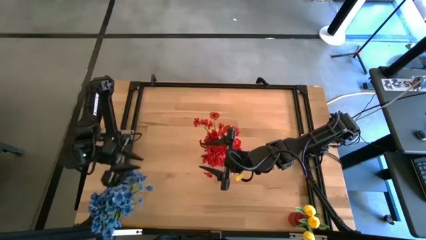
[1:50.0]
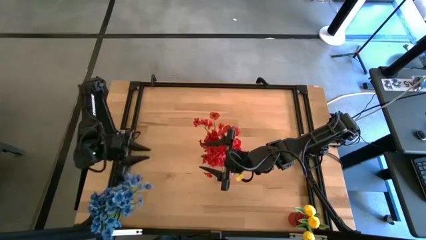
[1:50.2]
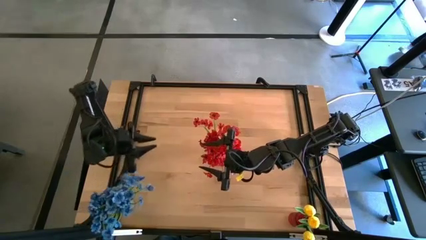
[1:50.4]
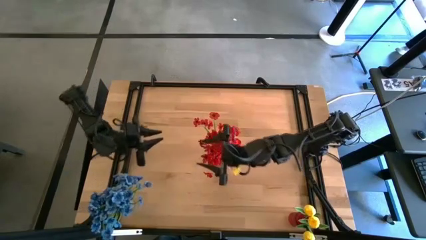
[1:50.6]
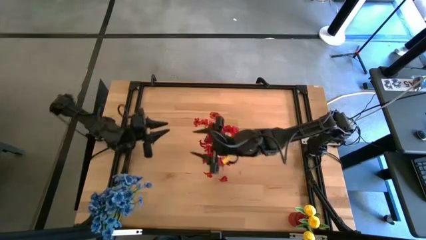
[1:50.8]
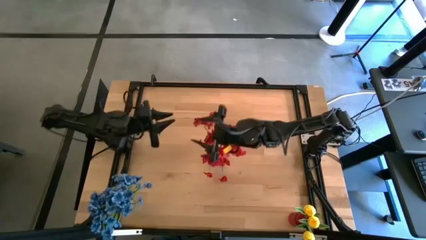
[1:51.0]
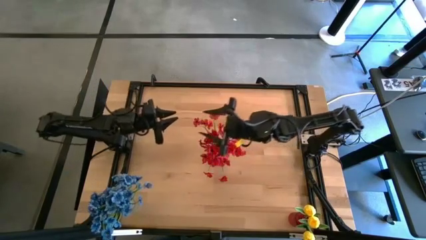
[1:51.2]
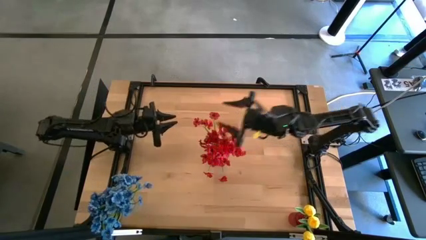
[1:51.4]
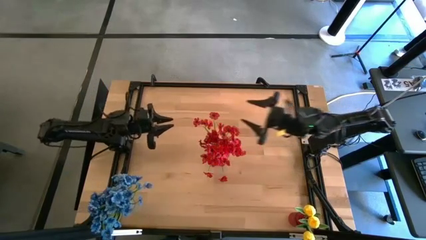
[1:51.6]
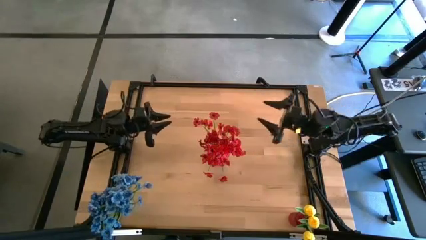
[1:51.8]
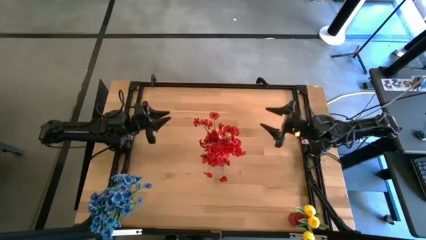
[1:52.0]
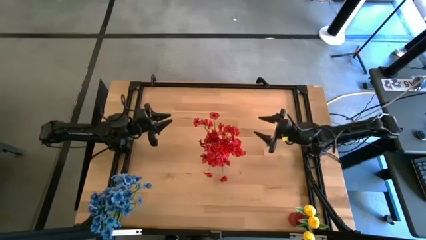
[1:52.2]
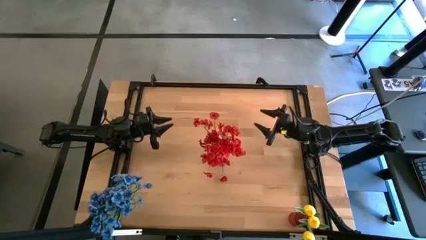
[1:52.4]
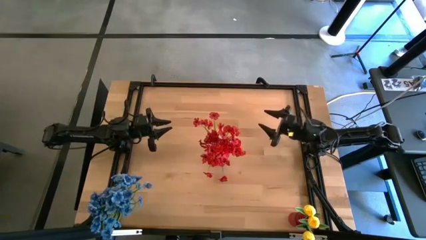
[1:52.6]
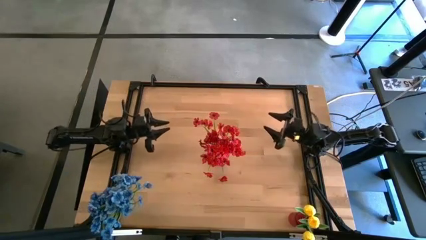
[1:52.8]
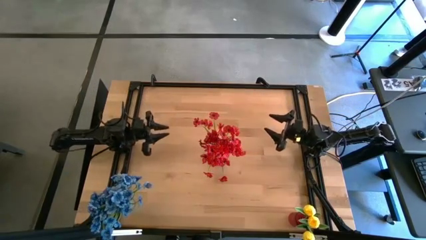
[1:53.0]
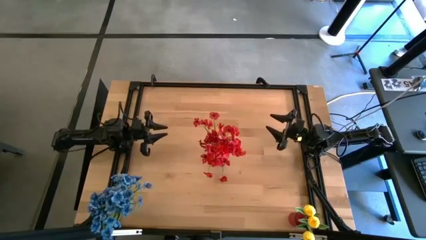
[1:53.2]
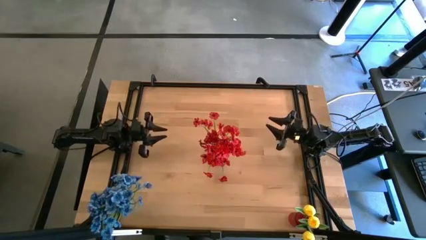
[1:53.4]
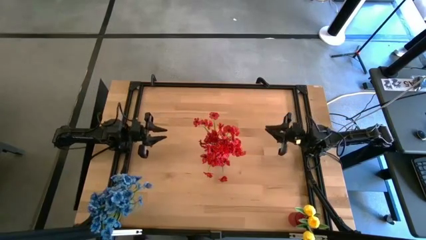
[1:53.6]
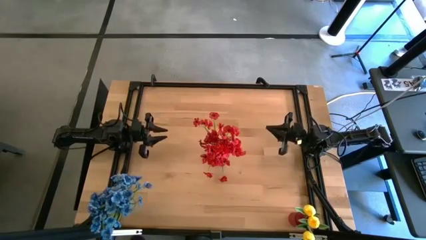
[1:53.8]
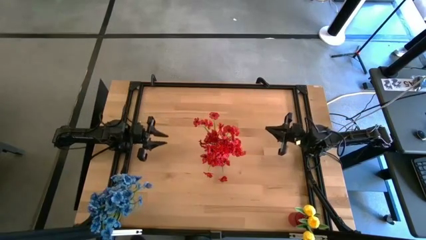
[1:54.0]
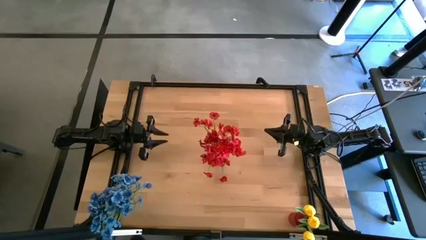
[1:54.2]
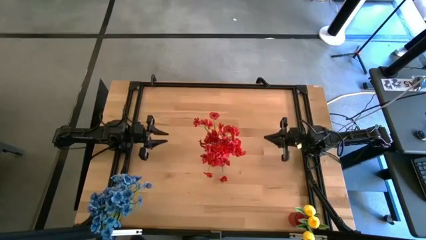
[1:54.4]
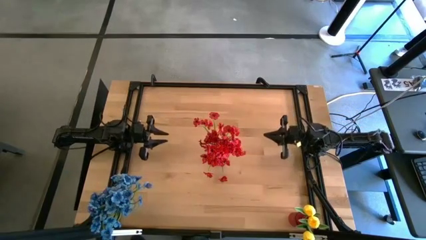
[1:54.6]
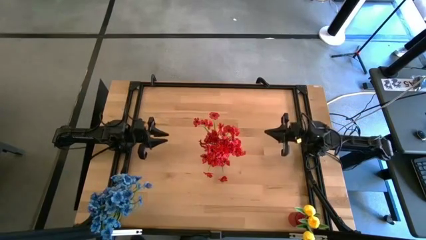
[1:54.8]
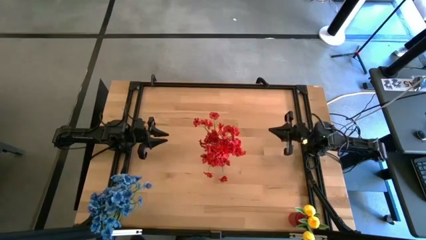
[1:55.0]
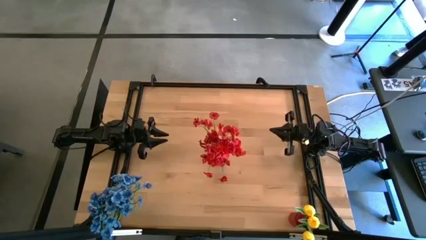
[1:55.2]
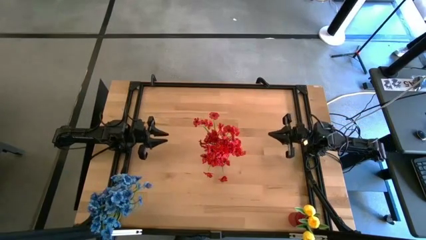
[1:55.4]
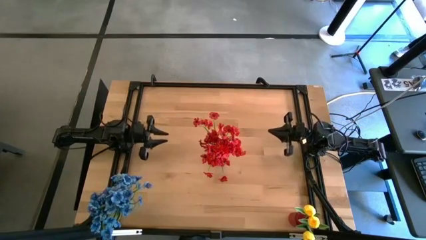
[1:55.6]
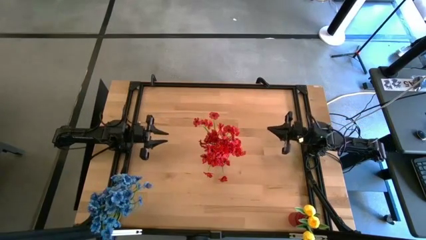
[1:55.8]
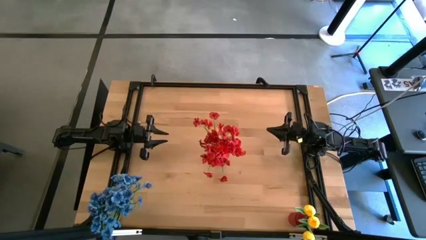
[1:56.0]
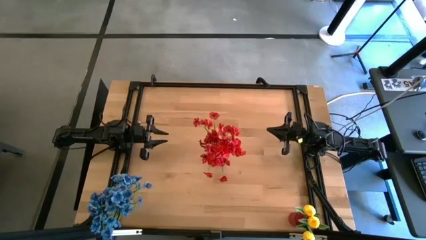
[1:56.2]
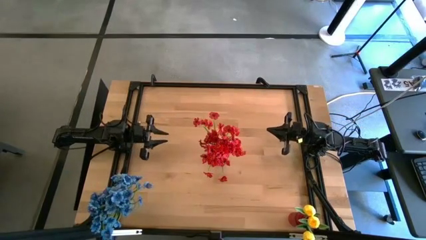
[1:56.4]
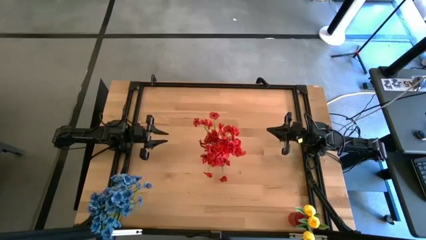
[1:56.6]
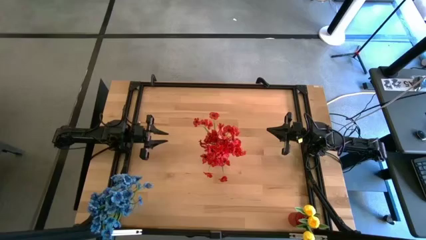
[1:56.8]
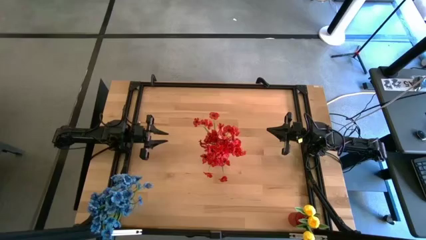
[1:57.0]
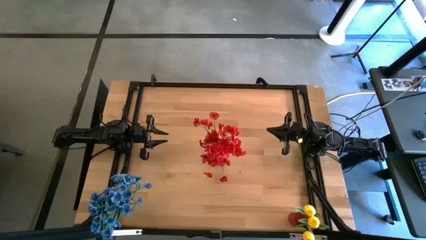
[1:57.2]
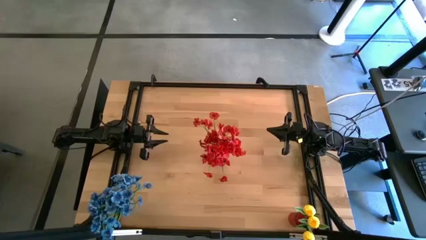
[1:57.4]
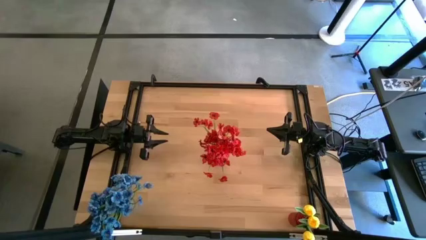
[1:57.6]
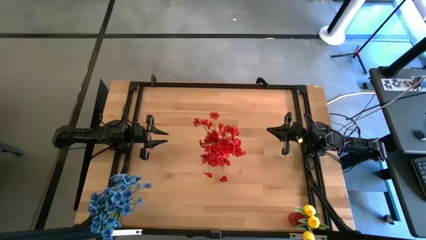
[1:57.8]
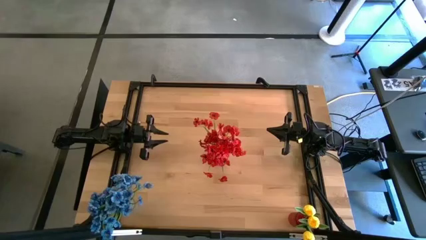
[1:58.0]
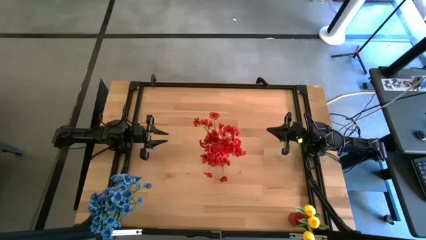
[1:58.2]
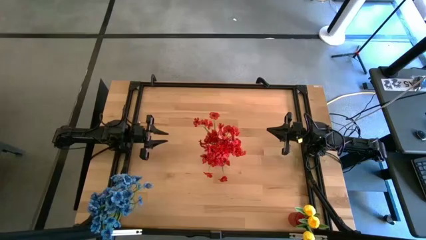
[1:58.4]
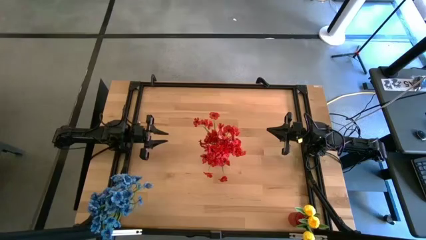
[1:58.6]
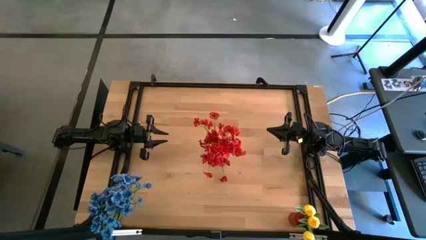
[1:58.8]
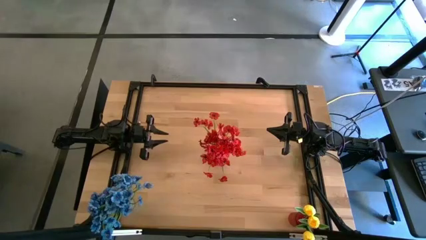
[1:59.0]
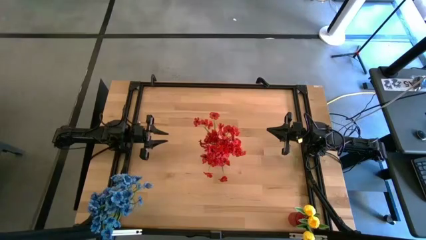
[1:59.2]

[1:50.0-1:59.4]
Task: Sort flowers into vase by color
Return to Home Position

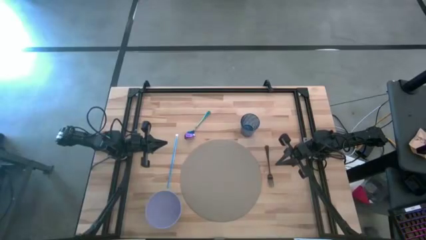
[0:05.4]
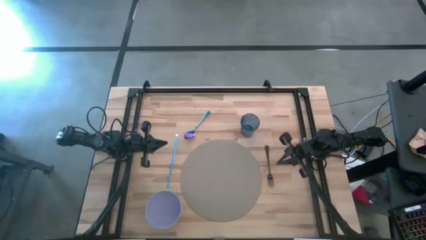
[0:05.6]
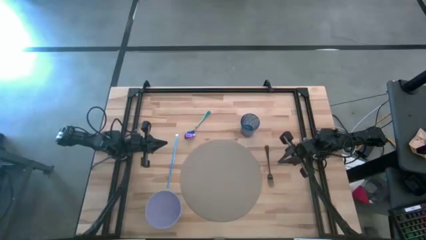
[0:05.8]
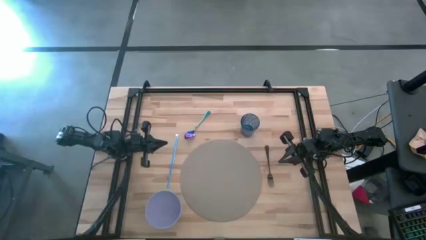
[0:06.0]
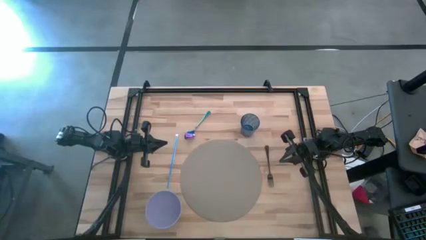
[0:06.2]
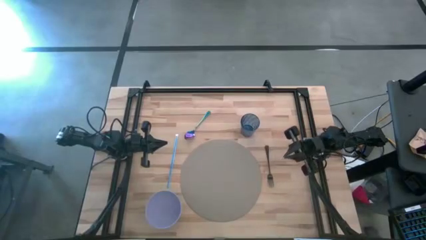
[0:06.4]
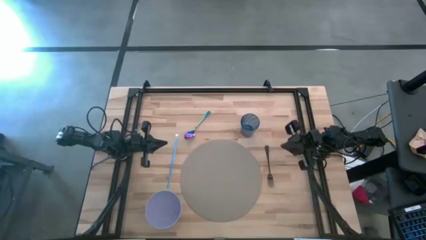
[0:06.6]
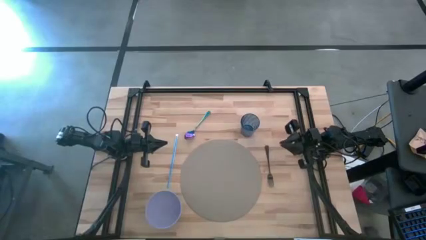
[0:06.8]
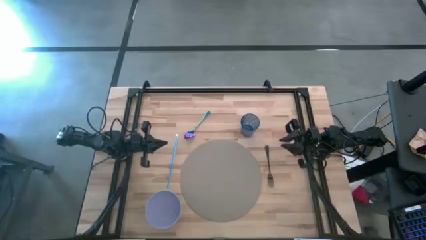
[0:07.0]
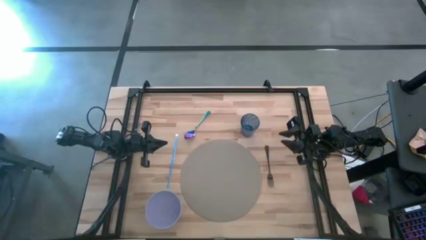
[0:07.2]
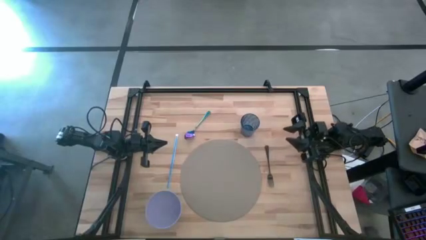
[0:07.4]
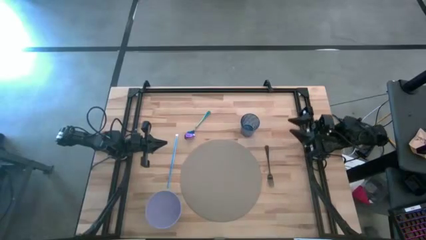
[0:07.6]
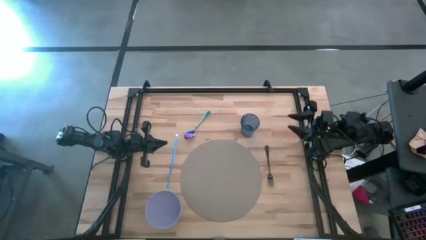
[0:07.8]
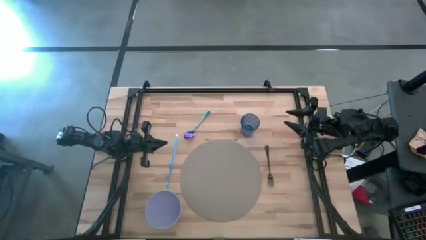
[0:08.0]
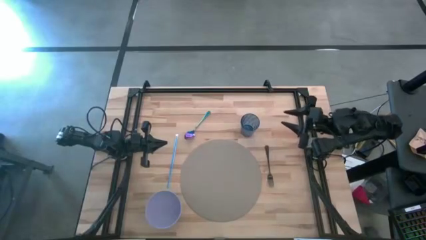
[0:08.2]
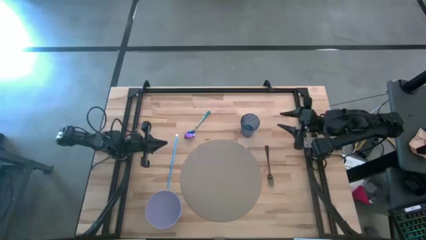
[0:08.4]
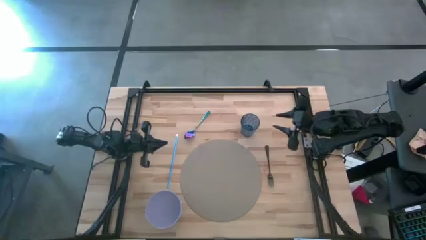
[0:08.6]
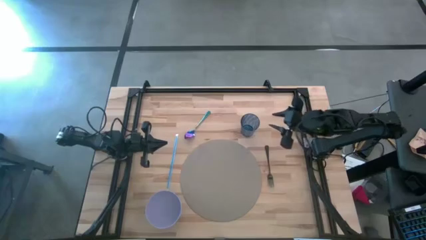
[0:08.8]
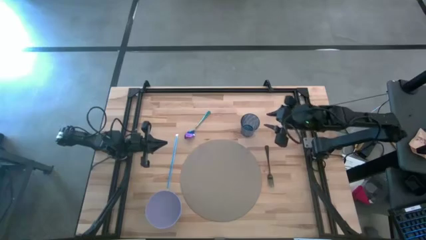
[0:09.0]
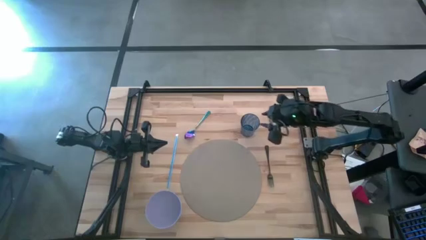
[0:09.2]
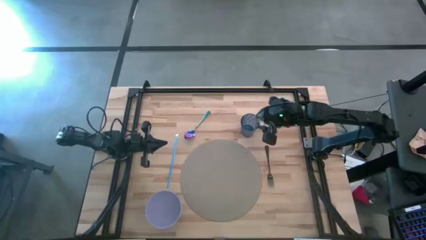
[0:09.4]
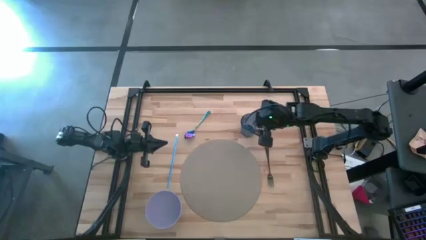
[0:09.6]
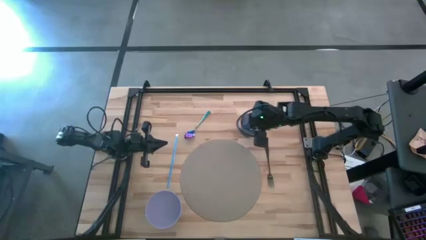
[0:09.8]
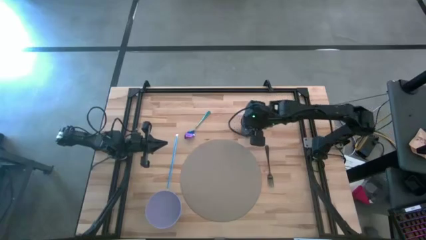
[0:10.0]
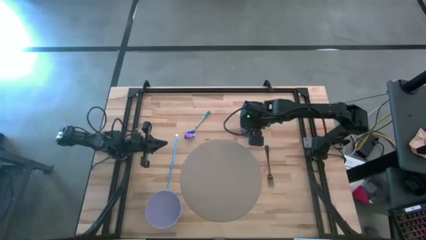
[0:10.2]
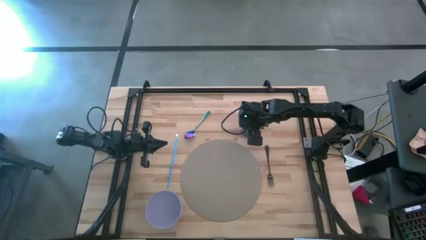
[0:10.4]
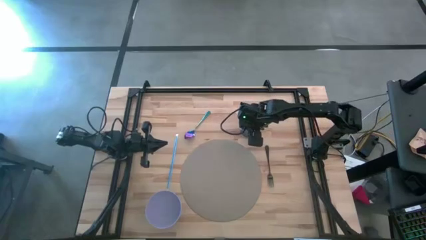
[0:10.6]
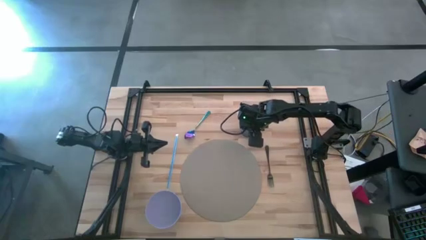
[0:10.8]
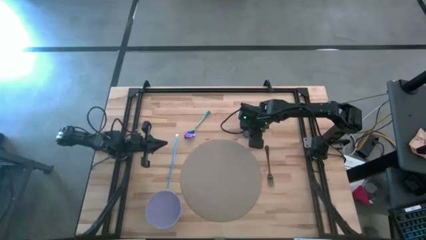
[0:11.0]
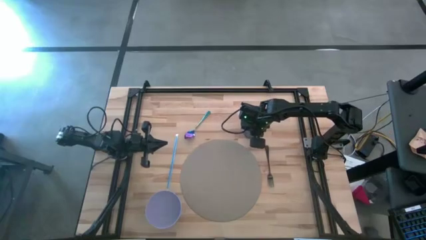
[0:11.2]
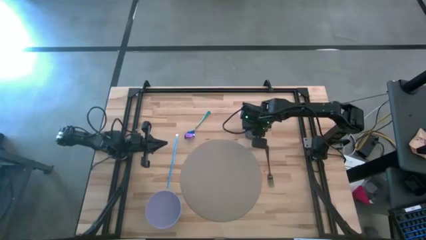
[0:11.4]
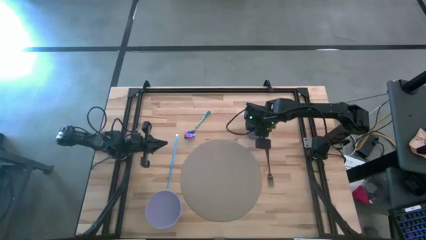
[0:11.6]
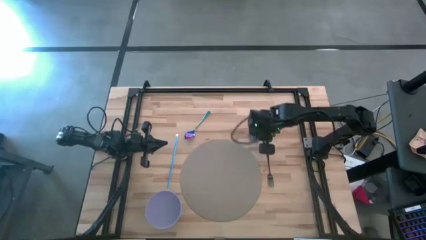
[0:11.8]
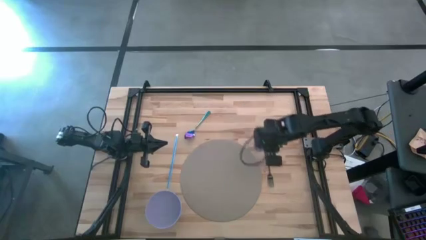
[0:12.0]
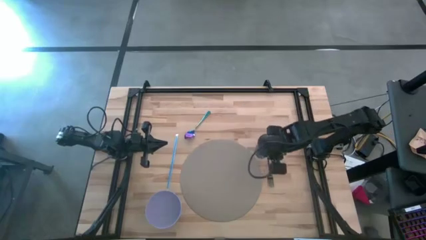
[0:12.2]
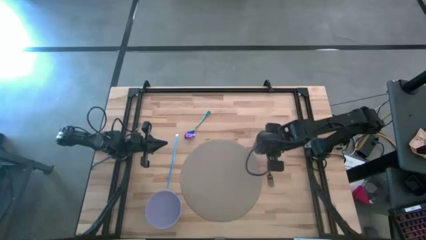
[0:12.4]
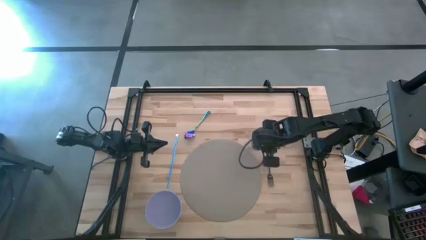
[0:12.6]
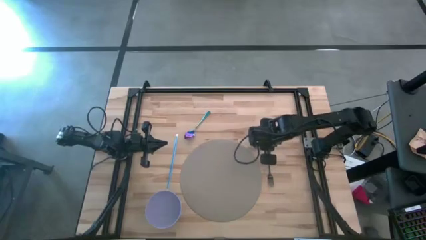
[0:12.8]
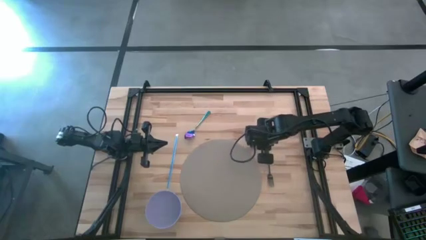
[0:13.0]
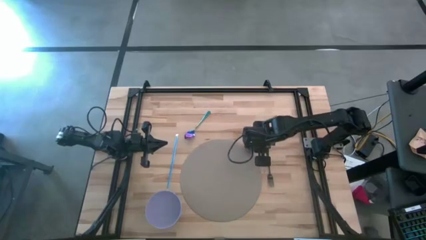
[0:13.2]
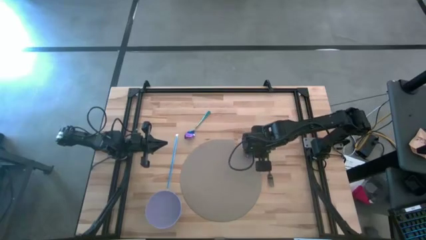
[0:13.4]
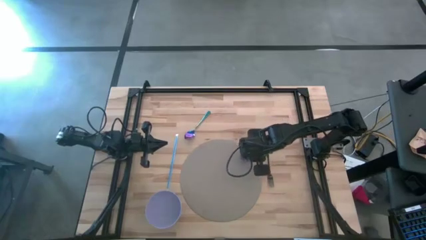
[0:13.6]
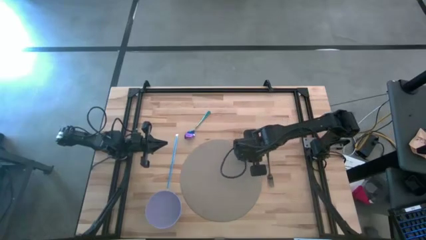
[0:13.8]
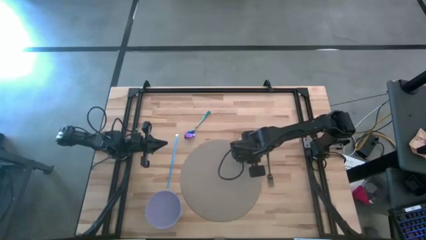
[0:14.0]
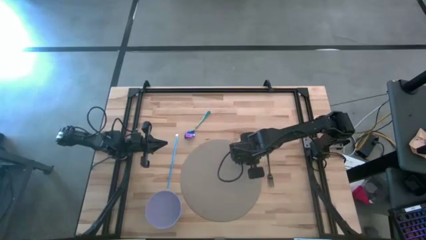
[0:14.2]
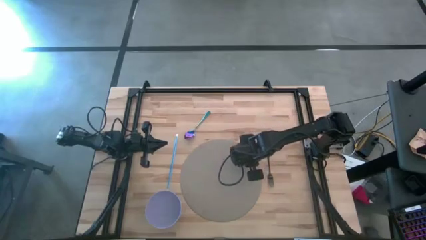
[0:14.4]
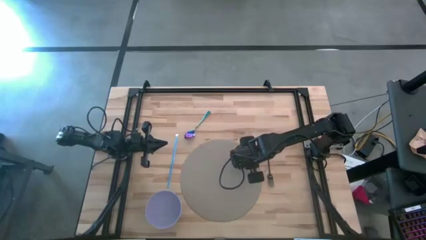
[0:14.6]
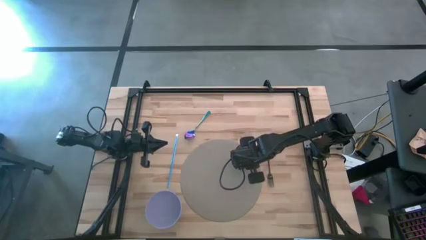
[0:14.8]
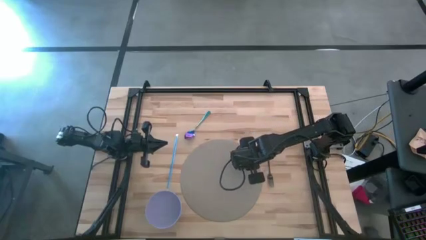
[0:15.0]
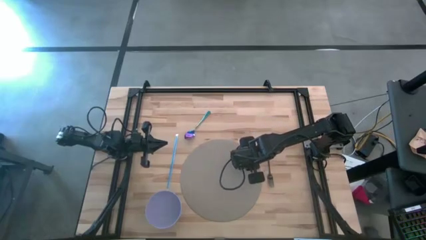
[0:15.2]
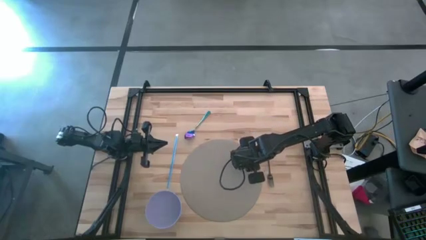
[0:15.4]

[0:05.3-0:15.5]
Task: Pick & Place Utensil
Put the cup on the top right of the mat
